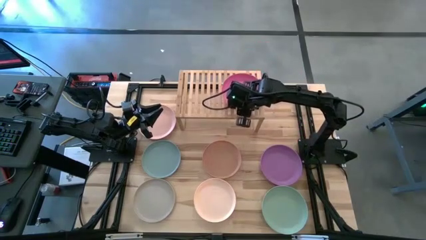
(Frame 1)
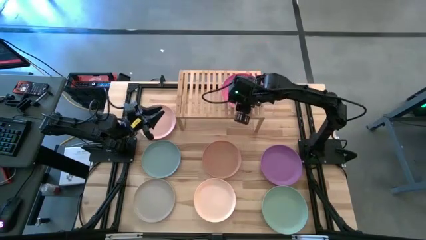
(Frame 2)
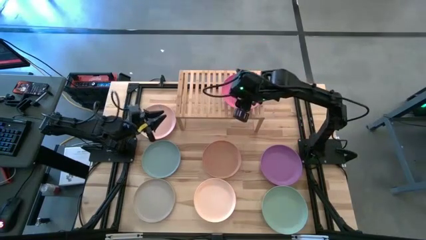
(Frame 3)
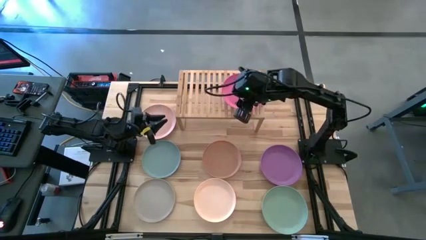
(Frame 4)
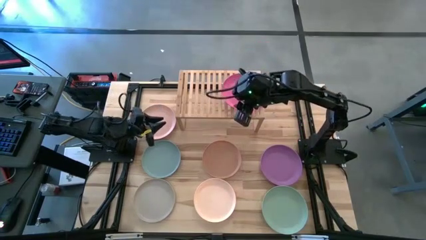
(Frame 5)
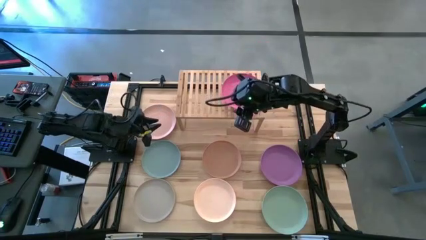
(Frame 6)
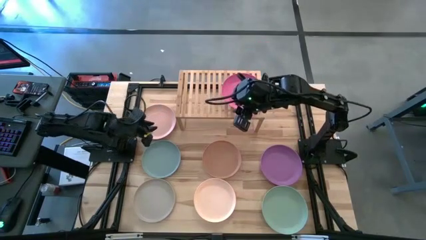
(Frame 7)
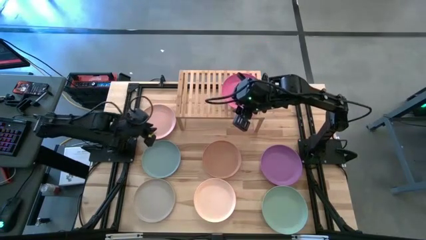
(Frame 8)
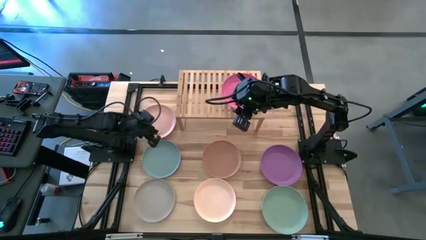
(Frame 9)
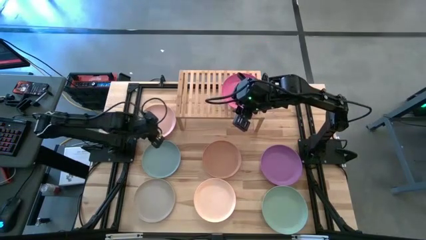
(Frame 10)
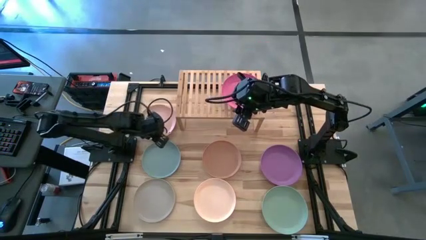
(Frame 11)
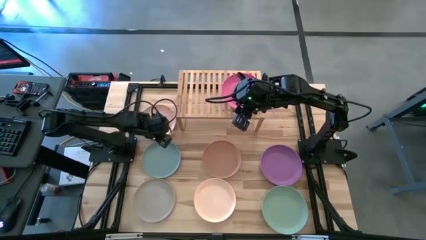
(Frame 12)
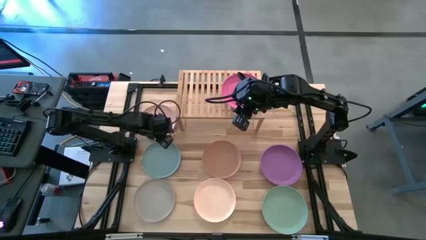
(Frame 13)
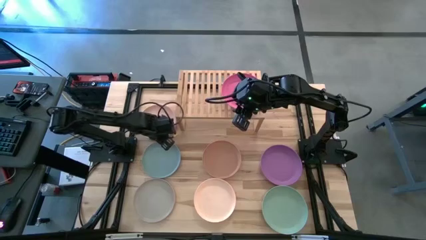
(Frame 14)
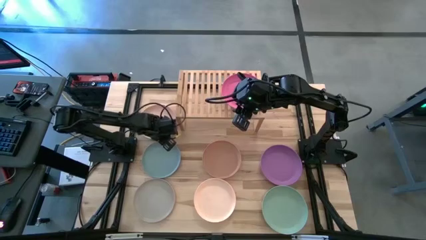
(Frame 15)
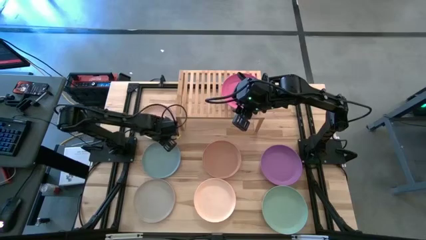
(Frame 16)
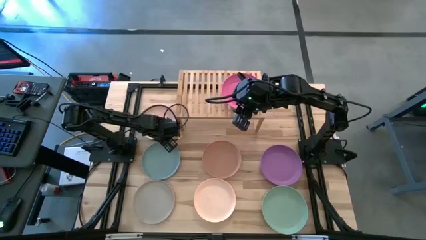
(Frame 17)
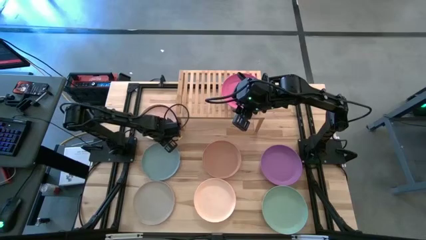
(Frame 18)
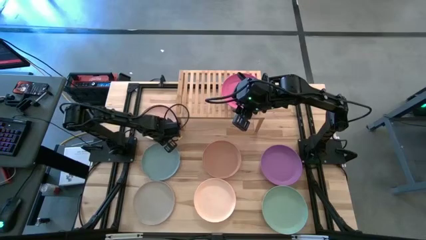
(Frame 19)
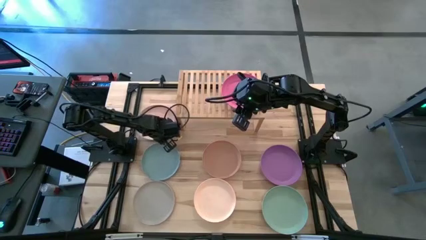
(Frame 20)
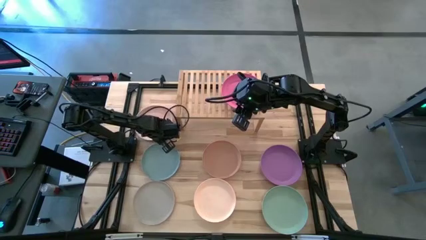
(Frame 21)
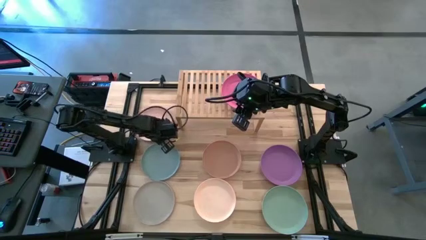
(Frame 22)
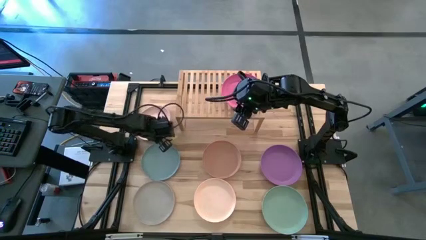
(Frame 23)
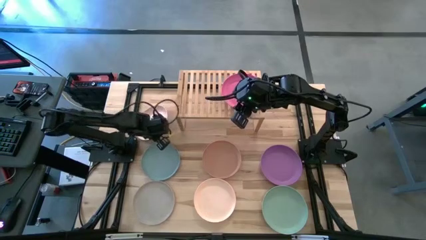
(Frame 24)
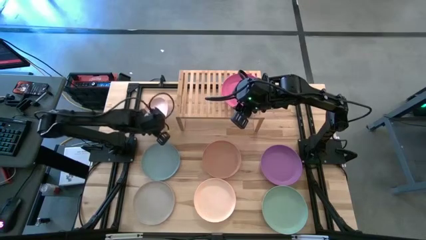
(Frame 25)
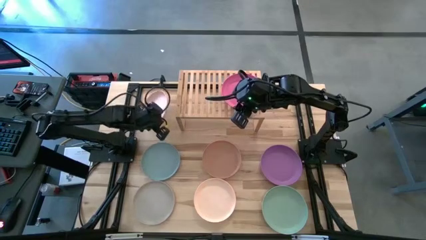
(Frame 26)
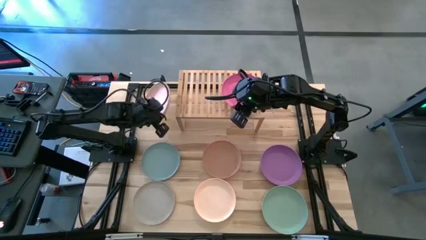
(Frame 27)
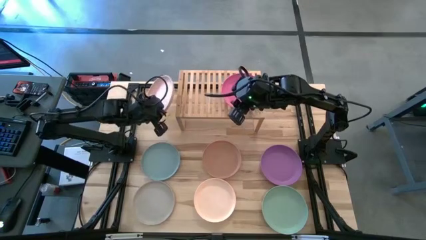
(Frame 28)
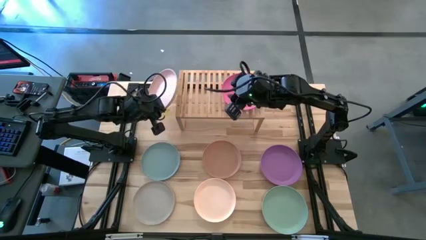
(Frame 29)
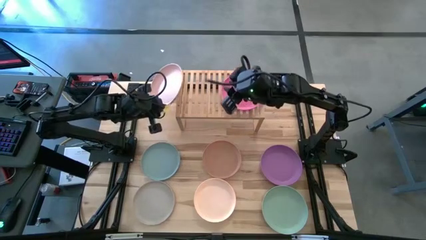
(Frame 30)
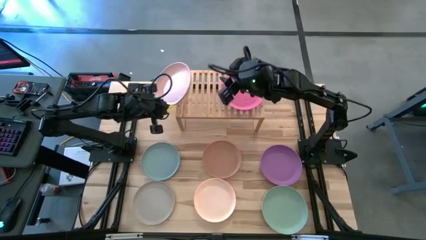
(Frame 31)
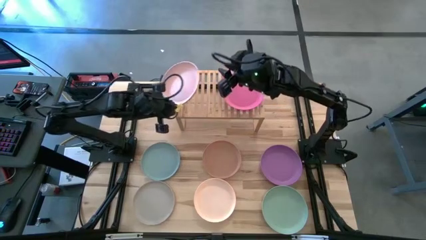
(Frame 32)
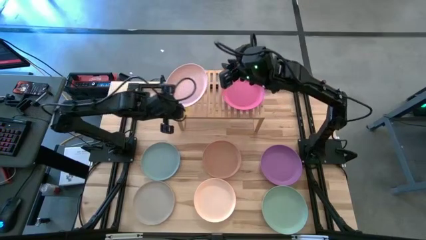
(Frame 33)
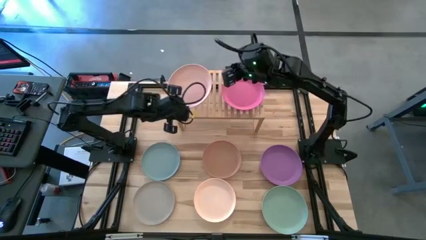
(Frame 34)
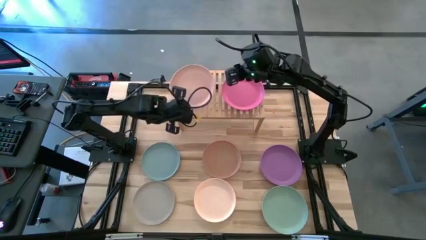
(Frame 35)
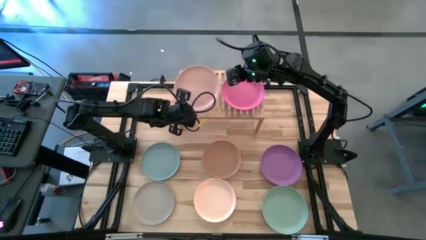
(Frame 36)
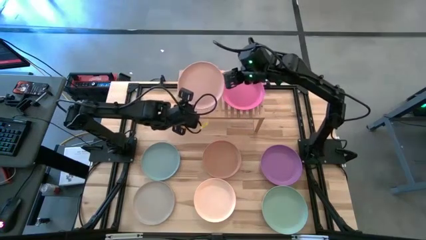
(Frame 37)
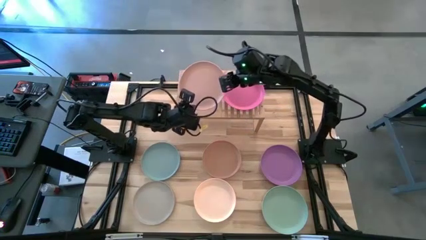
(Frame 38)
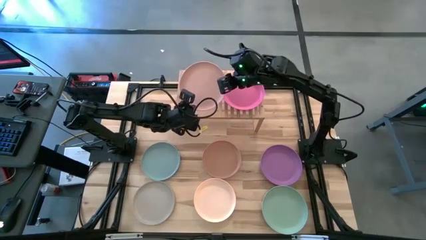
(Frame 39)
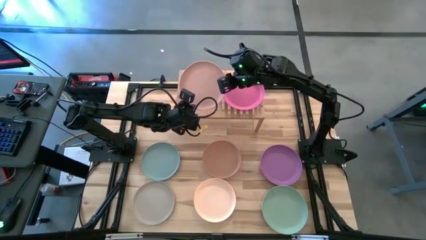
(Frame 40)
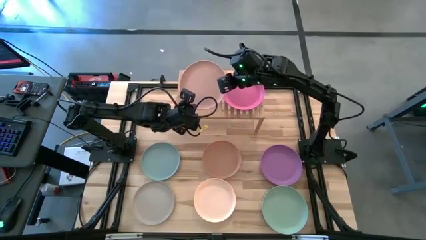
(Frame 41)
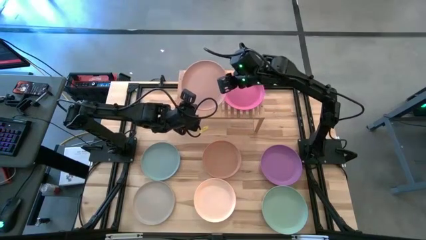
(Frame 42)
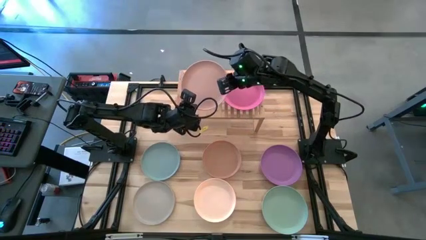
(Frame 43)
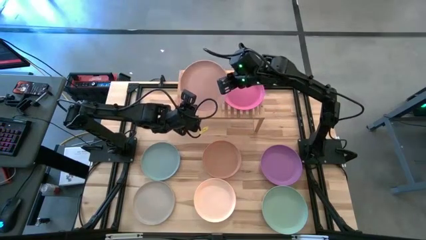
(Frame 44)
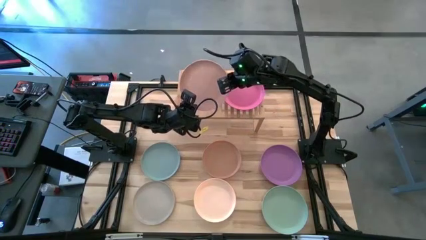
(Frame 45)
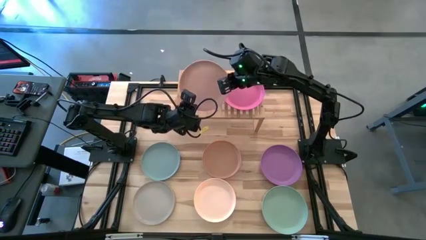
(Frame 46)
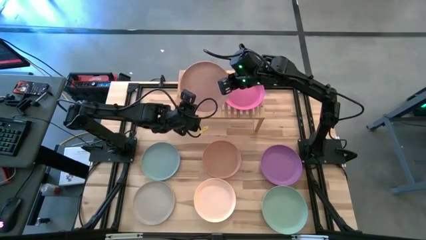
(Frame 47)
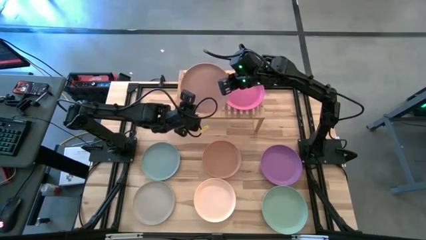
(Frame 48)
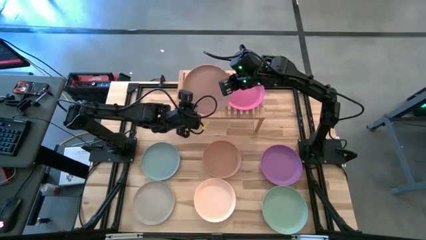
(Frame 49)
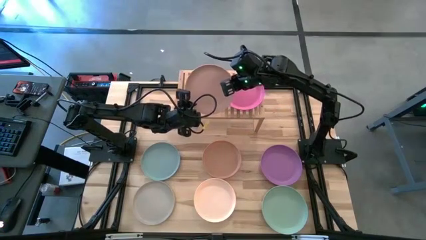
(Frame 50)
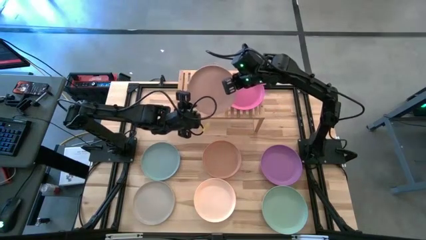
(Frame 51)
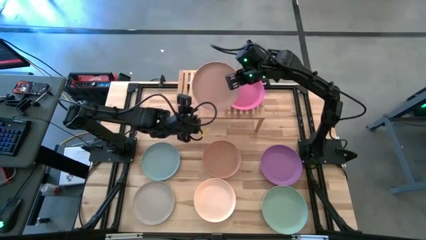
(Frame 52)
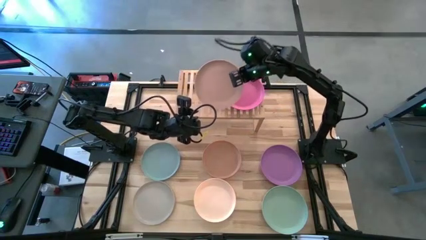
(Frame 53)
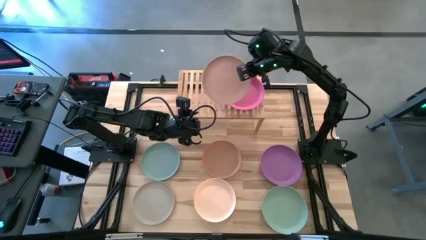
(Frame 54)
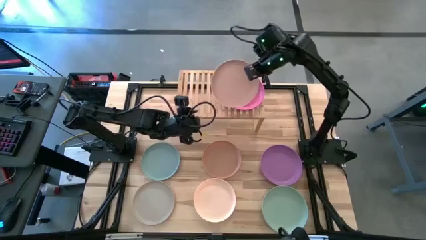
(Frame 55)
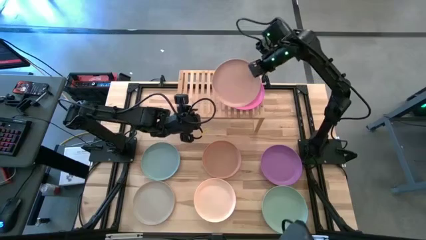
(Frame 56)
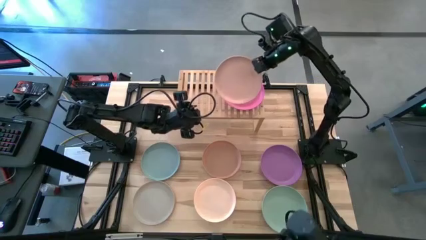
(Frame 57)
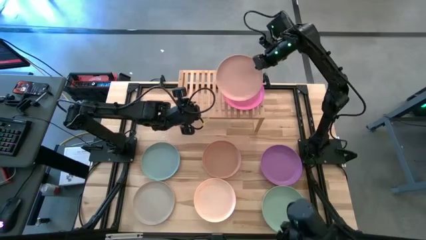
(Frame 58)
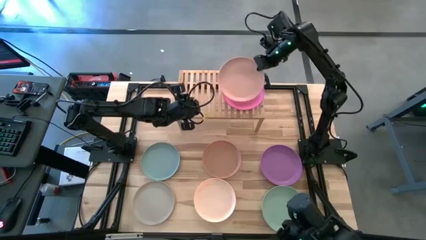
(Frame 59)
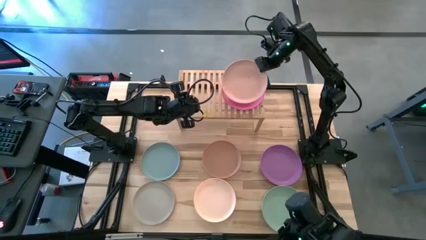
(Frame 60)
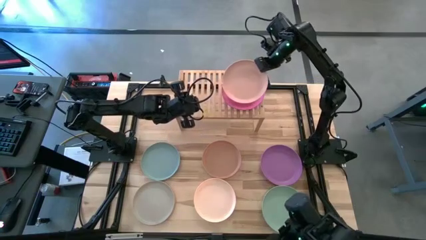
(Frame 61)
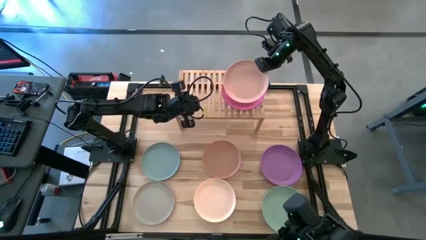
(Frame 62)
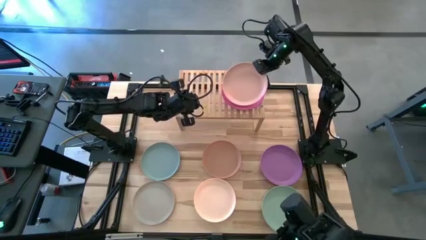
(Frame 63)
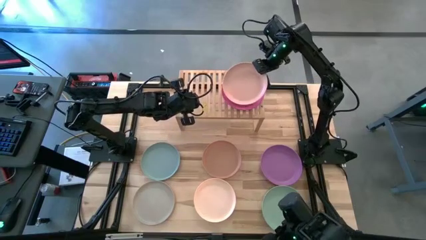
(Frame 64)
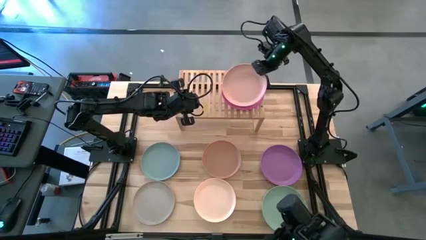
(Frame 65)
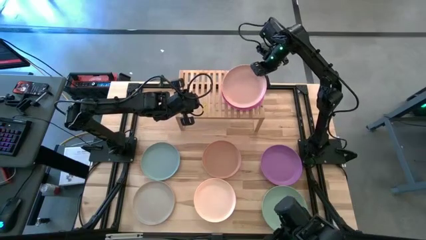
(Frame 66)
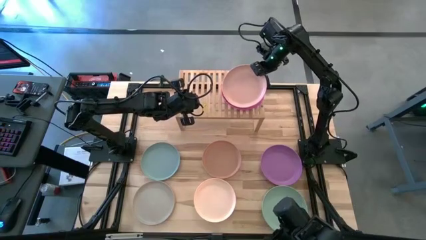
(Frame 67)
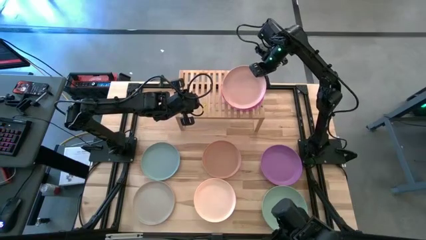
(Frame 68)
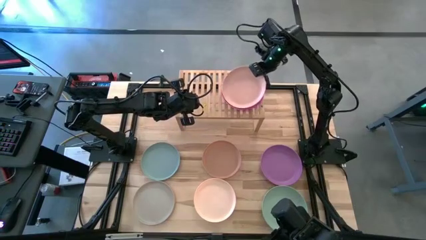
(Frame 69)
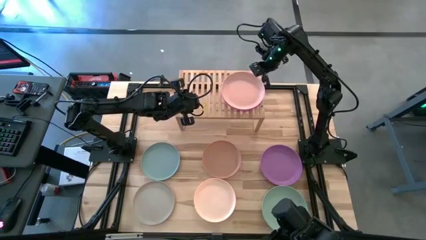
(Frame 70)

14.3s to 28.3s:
Task: Place and stack plates onto a shelf
Stack the orange plate on top of the pink plate on the shelf
